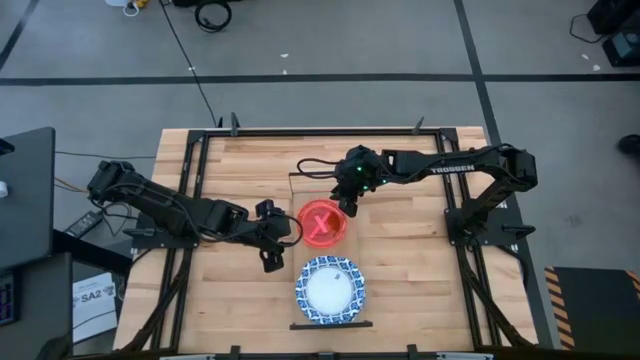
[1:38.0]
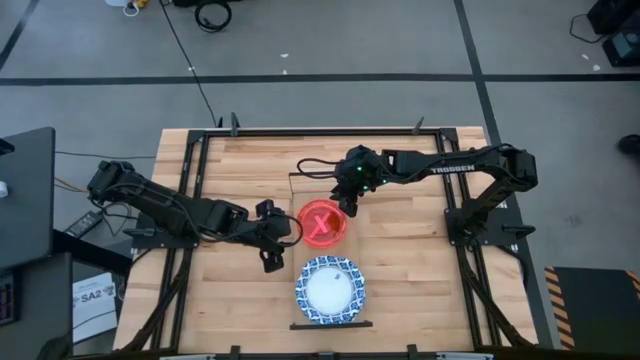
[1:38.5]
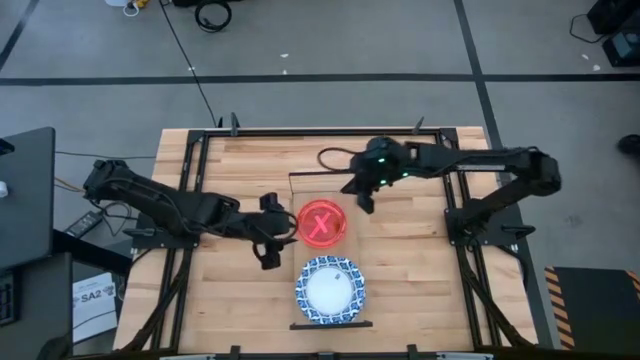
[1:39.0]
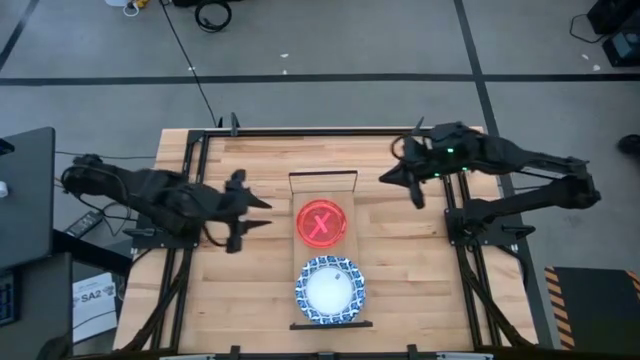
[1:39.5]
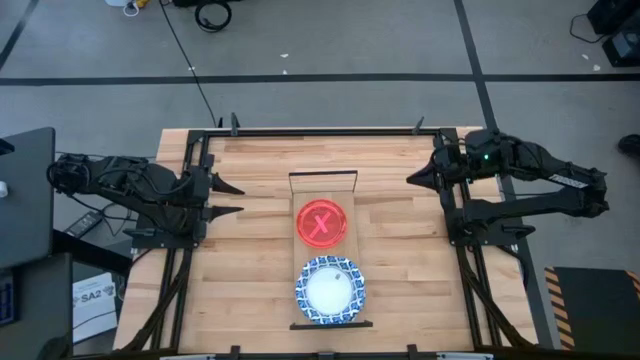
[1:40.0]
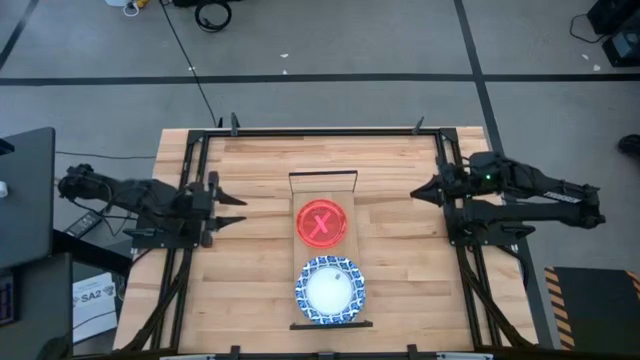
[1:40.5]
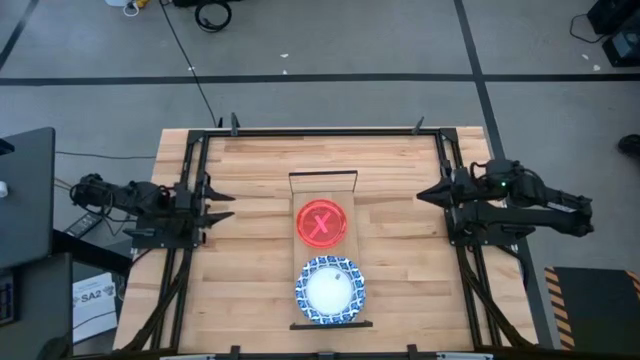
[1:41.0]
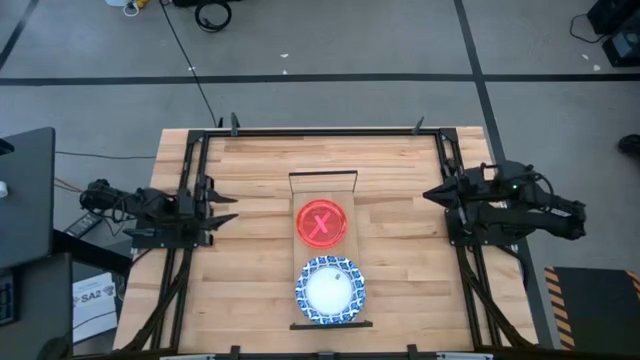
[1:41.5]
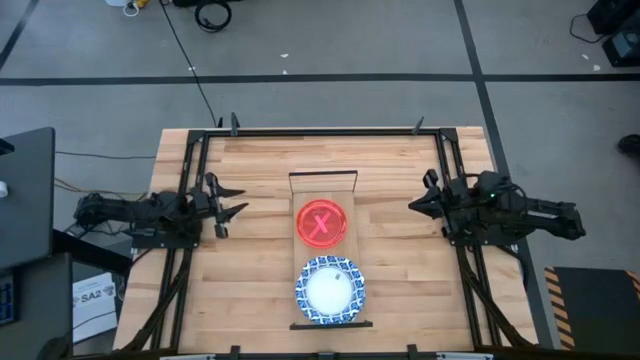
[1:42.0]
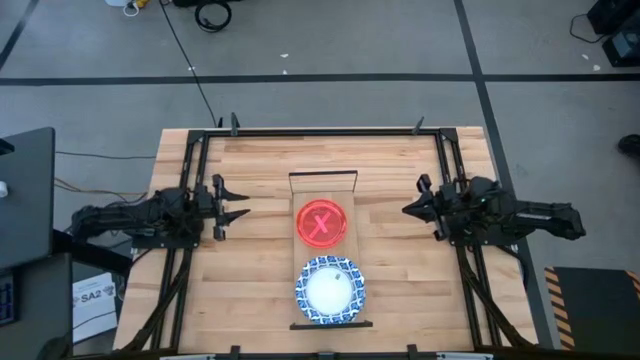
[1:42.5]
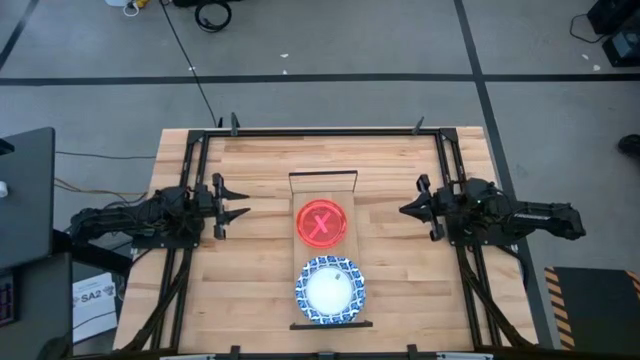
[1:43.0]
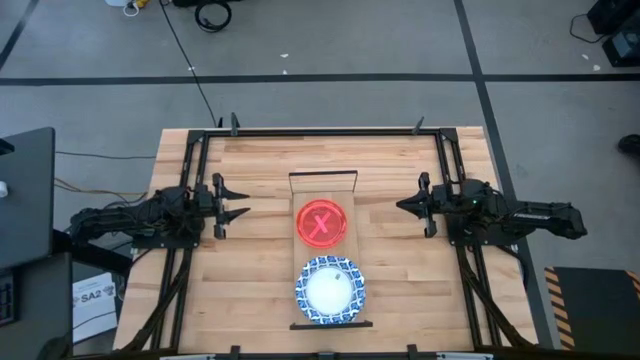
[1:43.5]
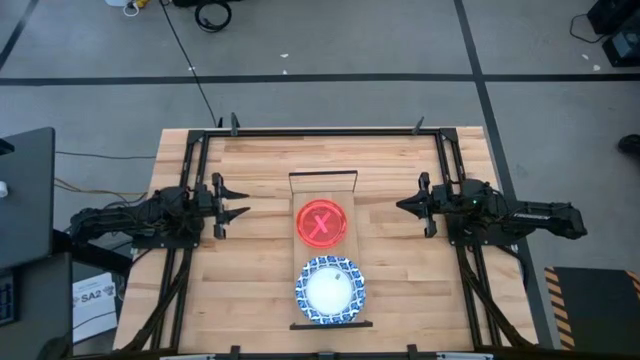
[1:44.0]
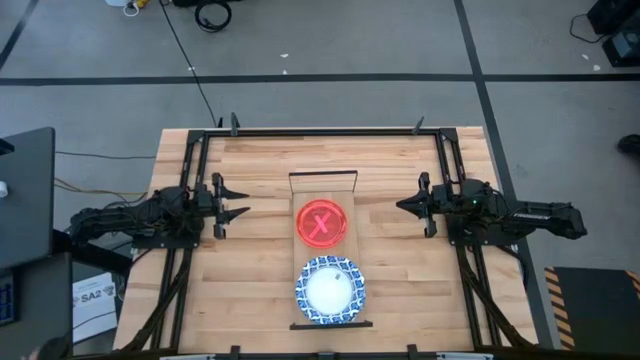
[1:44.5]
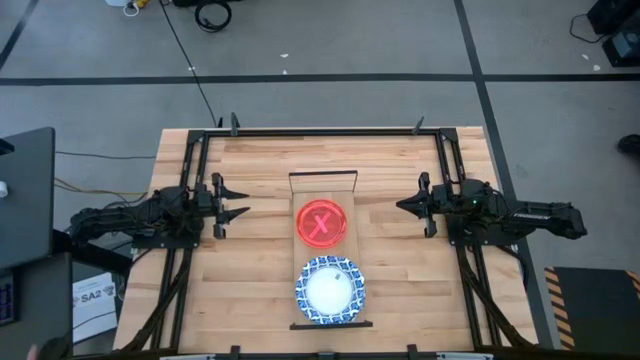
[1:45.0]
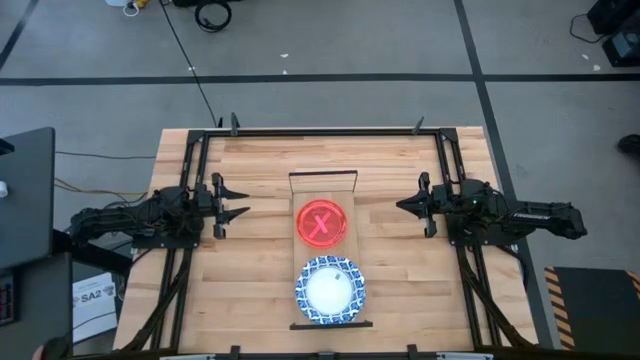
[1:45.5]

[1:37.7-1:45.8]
Task: Place and stack plates onto a shelf
Return to Home Position

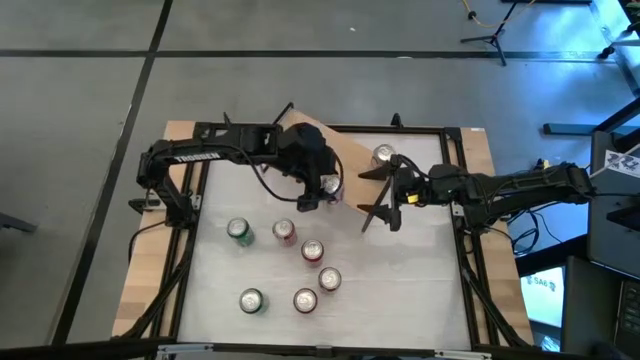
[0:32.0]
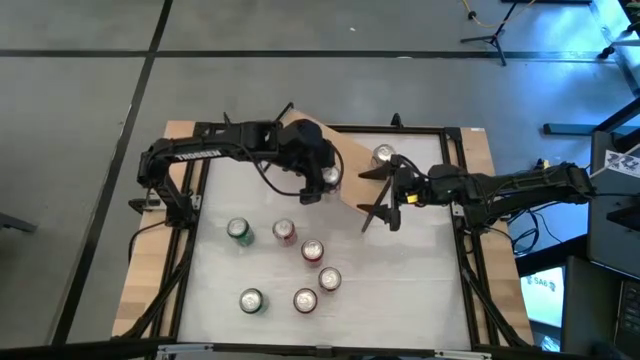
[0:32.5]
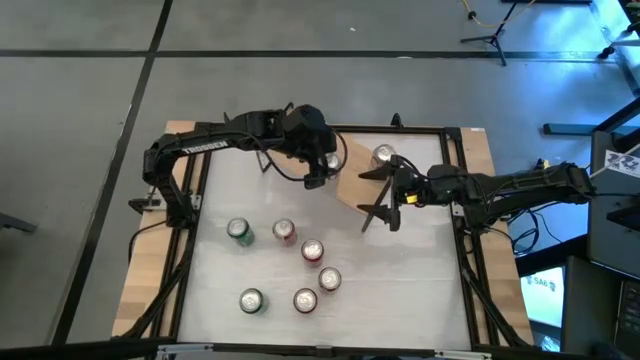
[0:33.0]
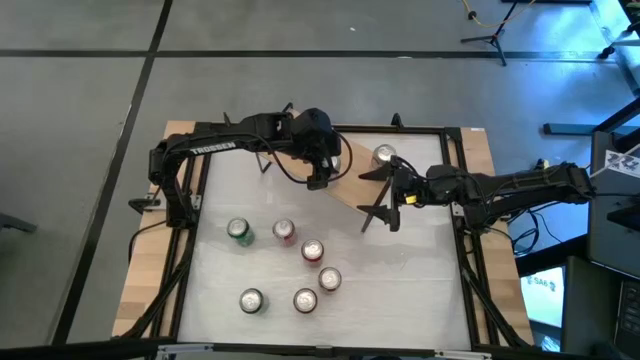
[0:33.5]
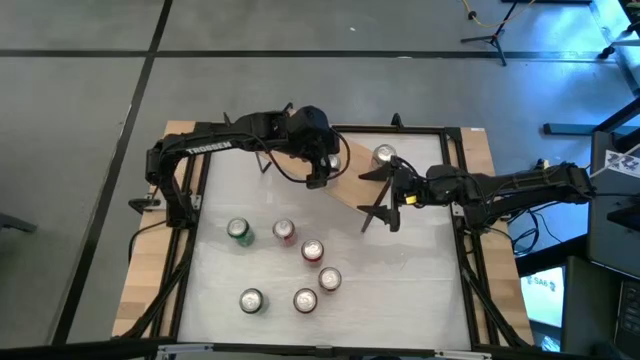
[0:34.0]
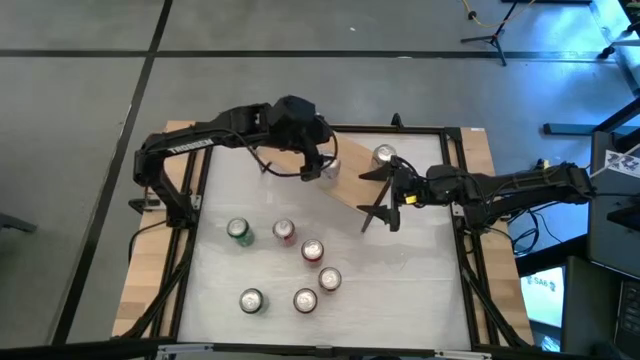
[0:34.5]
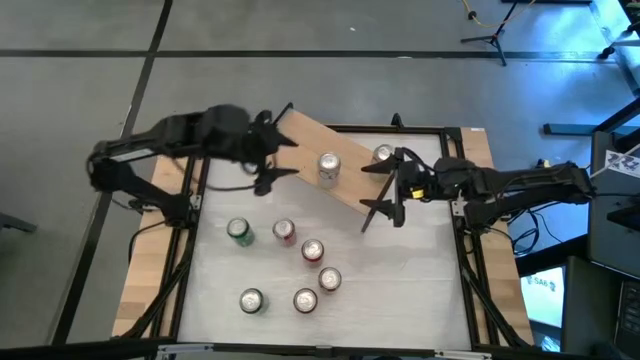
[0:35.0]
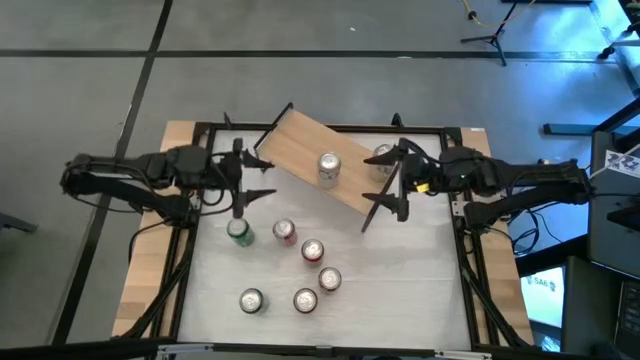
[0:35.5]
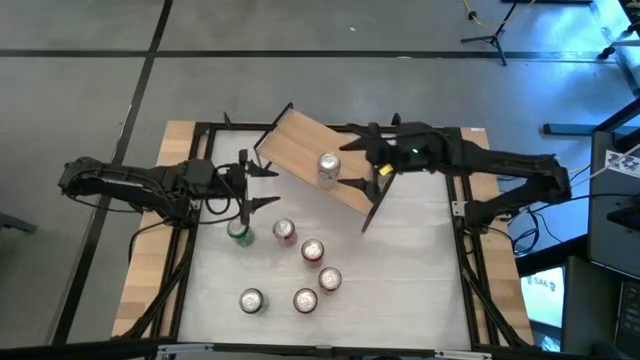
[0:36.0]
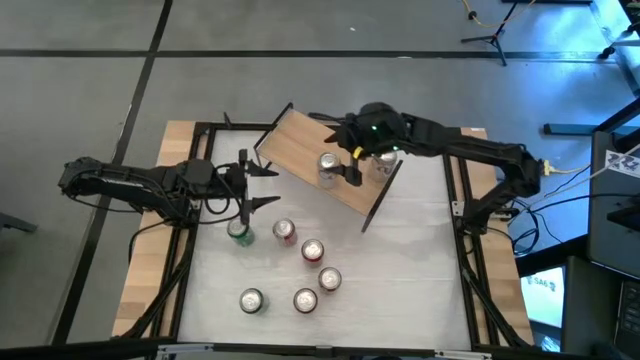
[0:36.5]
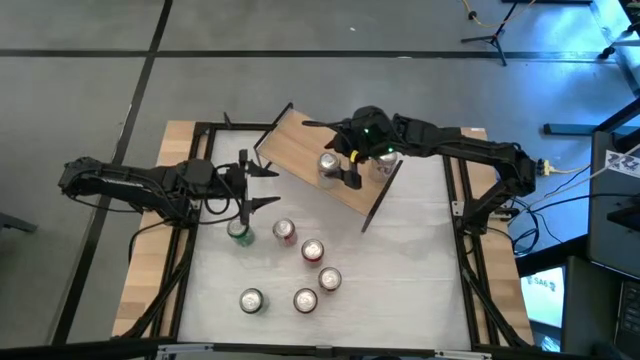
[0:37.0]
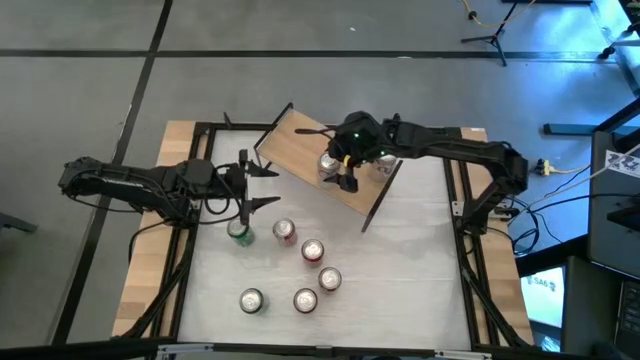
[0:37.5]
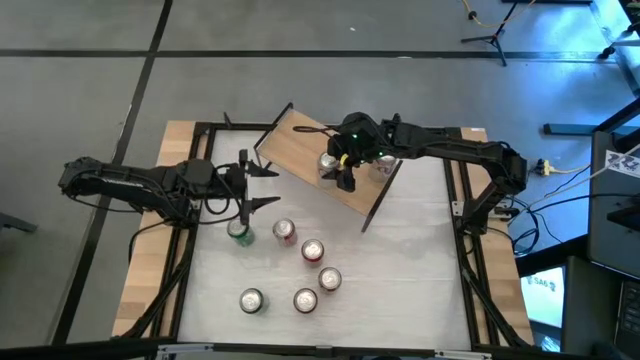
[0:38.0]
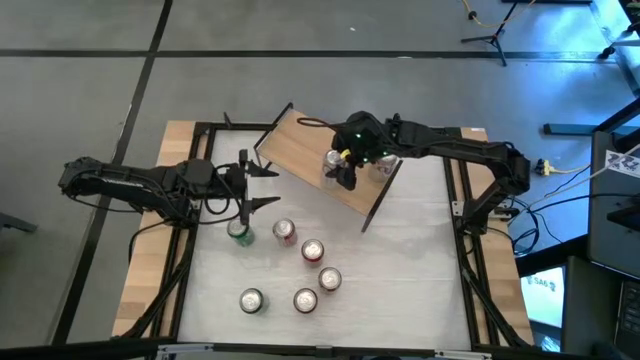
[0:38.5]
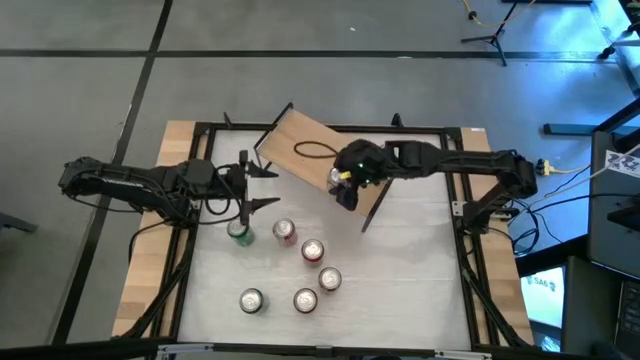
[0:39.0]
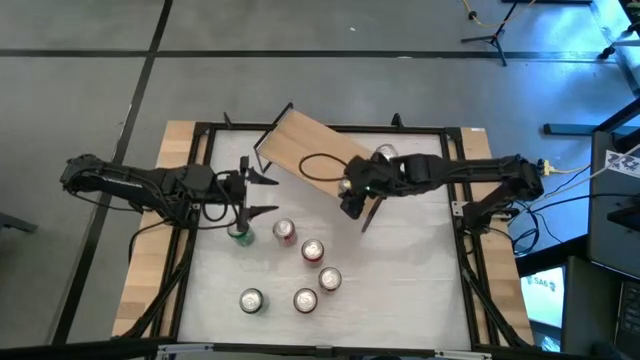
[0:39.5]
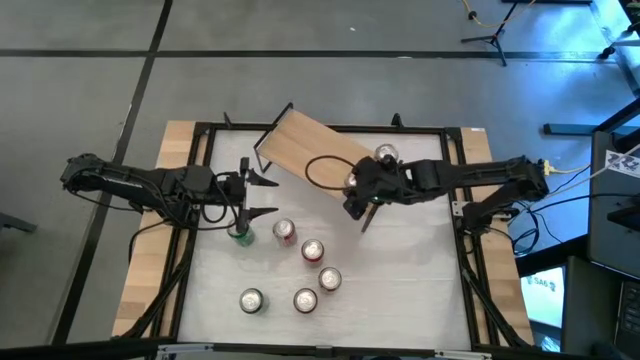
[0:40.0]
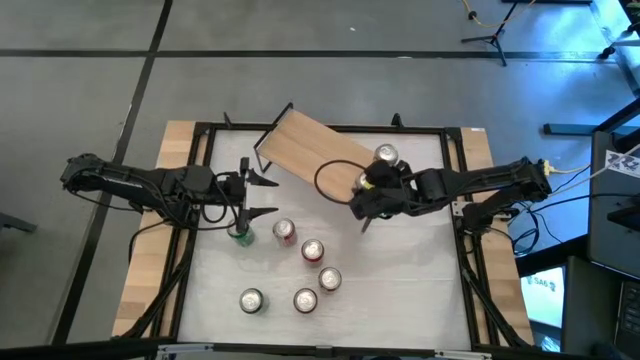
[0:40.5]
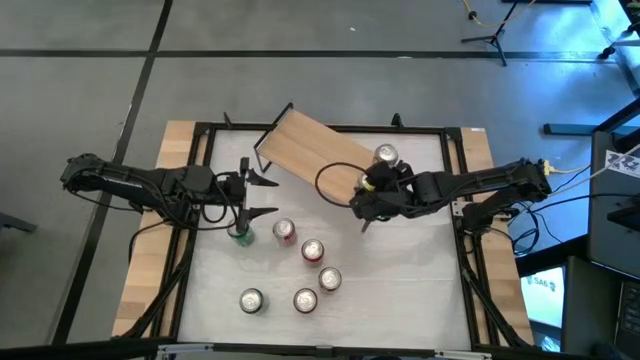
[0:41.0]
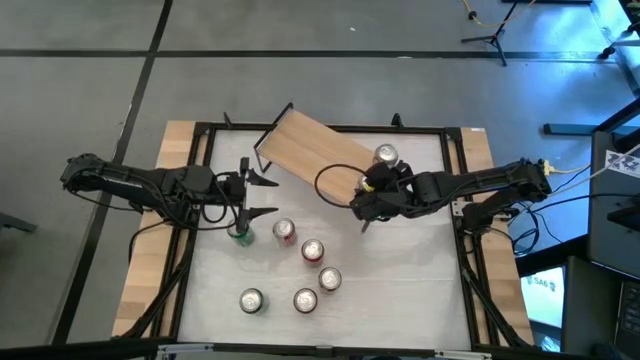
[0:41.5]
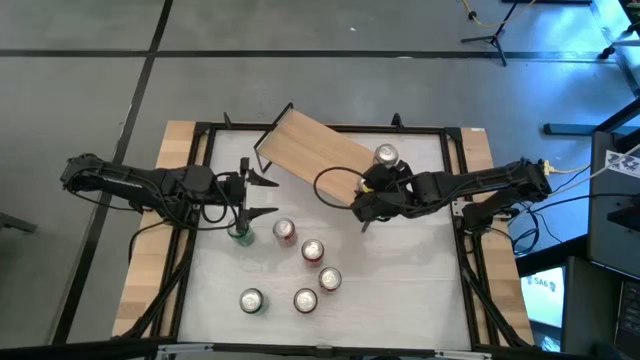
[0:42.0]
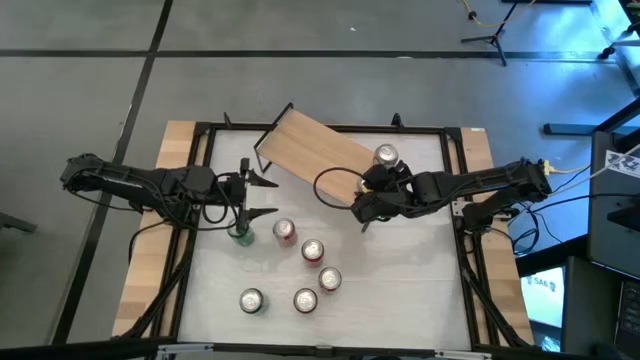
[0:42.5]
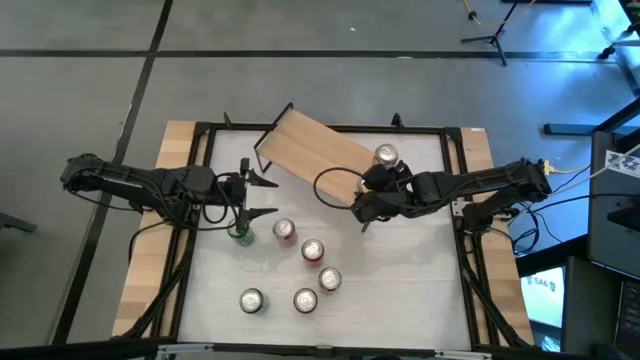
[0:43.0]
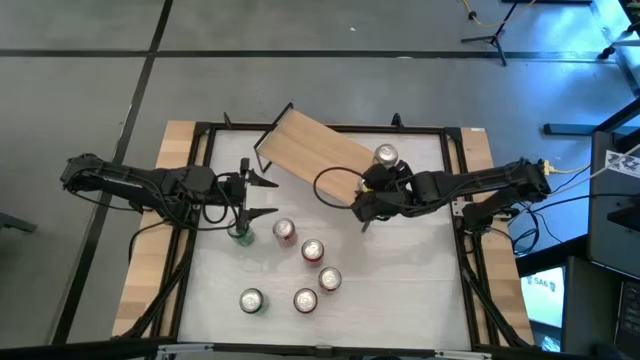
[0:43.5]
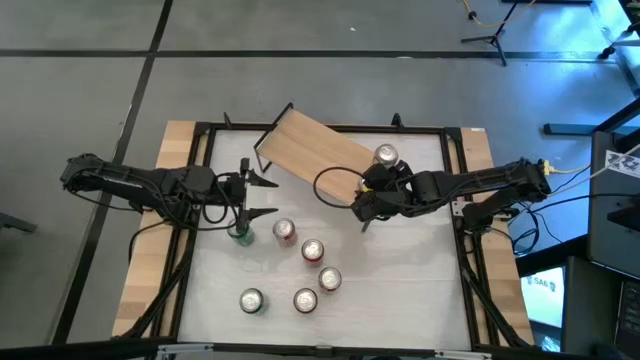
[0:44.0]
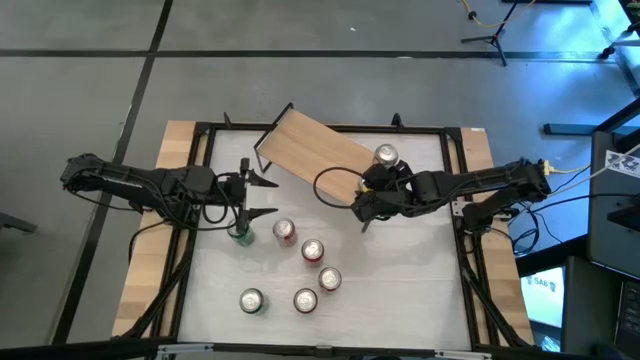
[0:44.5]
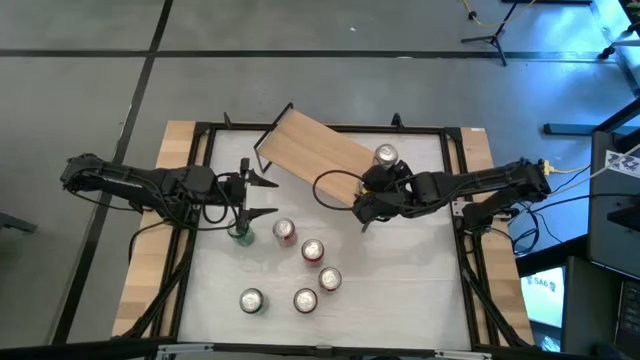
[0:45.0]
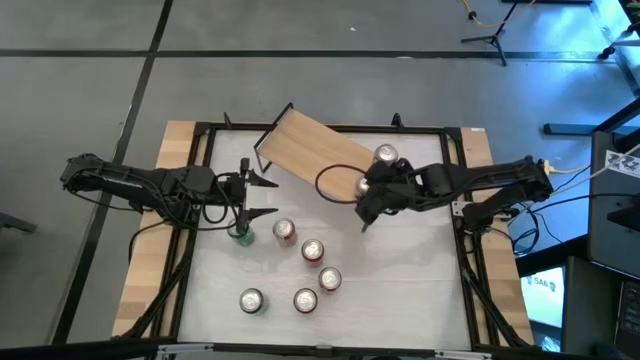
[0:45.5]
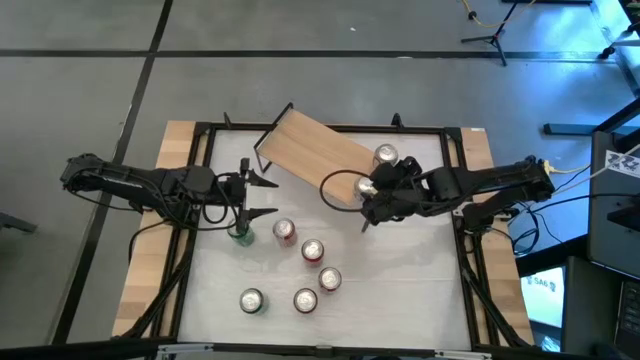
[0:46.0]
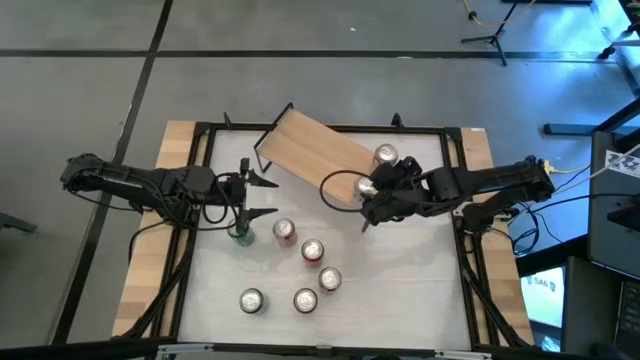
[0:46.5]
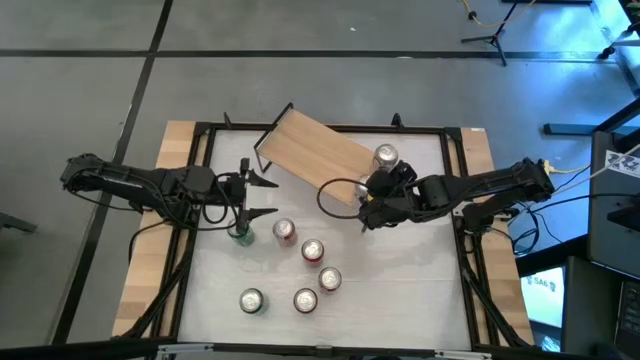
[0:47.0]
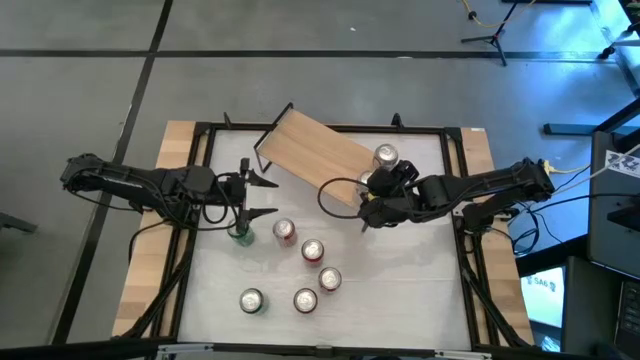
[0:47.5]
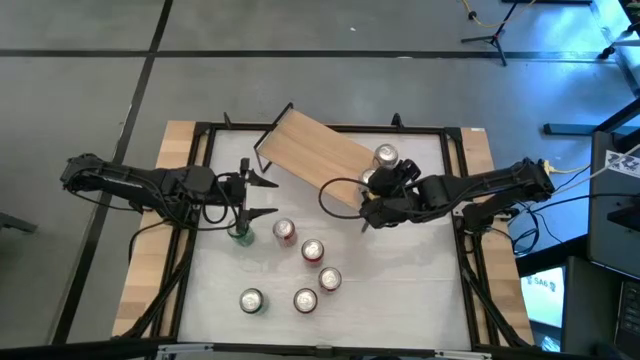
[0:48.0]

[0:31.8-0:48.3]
Task: Place canned beverage on shelf
Put the red-silver soda can on the shelf aligned with the other red-silver soda can
